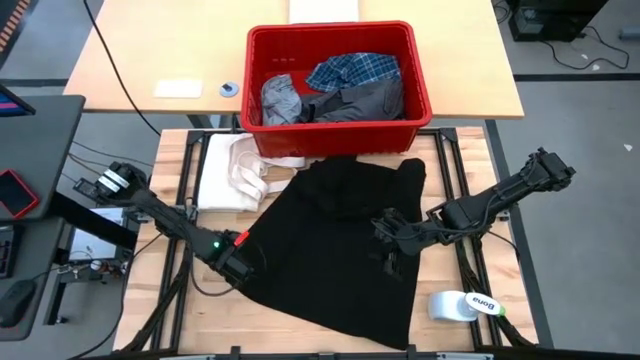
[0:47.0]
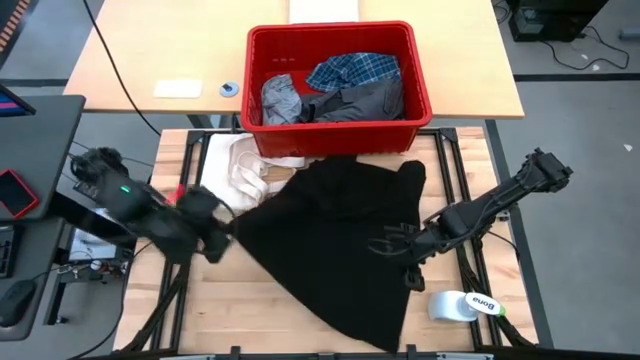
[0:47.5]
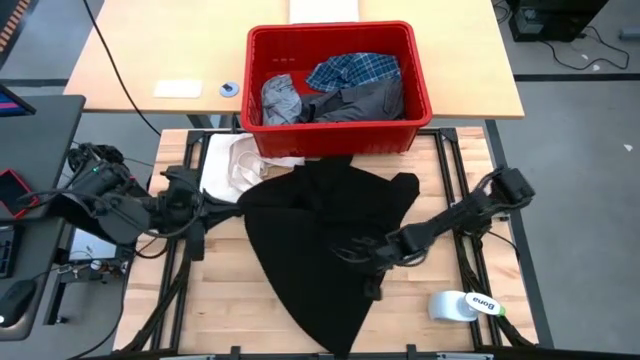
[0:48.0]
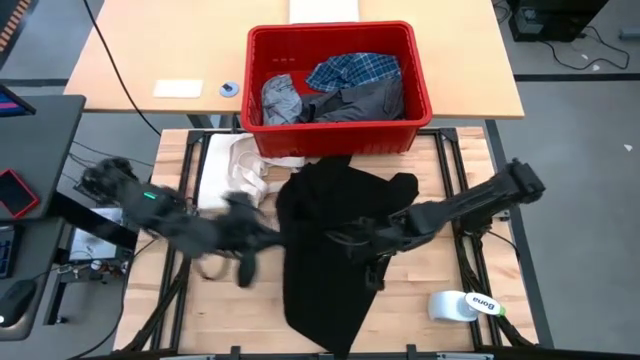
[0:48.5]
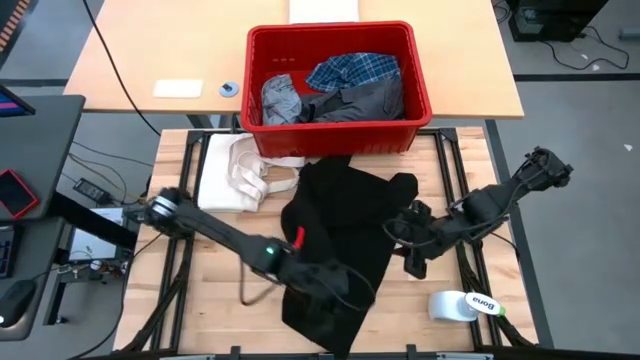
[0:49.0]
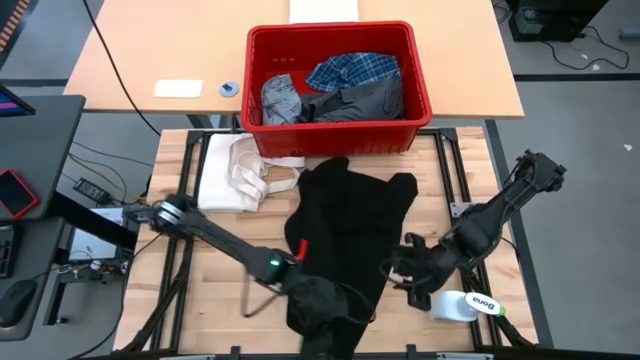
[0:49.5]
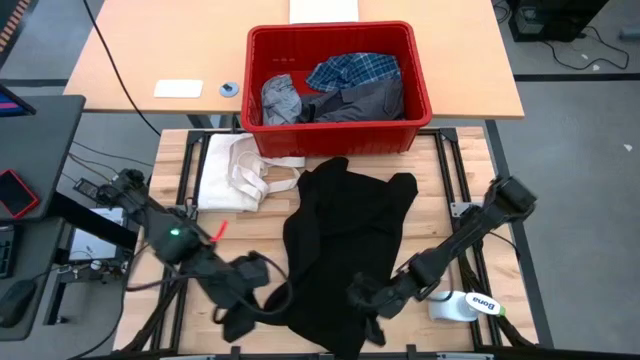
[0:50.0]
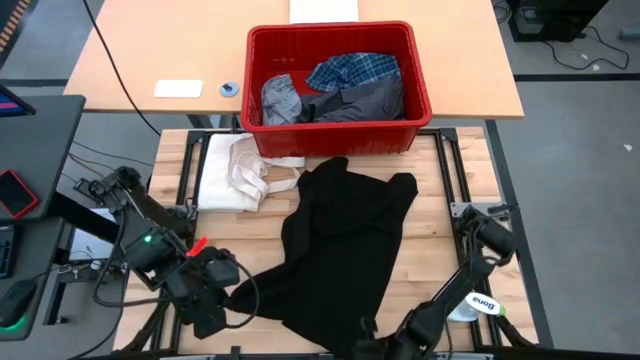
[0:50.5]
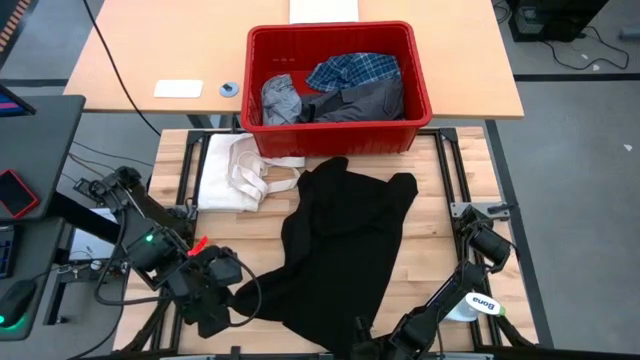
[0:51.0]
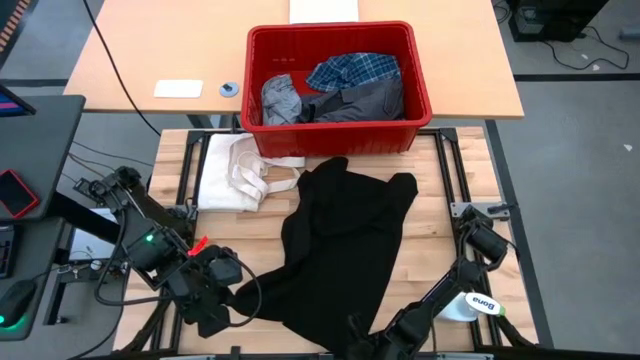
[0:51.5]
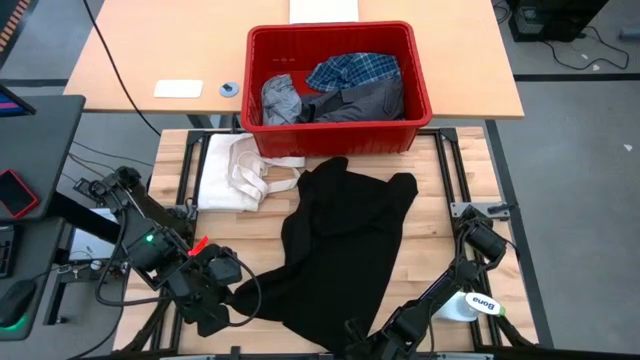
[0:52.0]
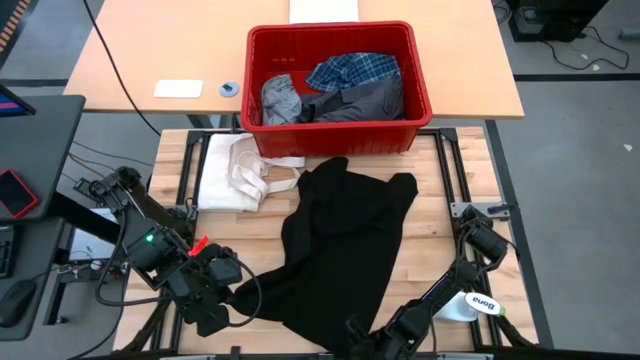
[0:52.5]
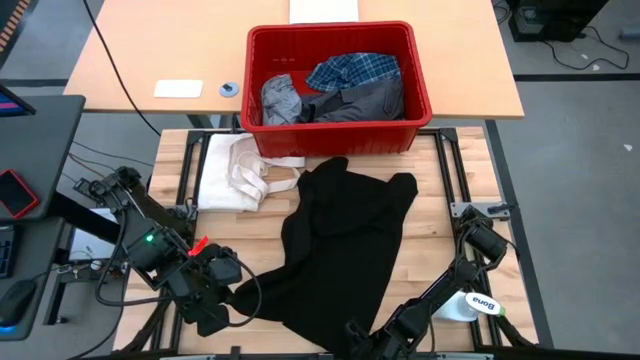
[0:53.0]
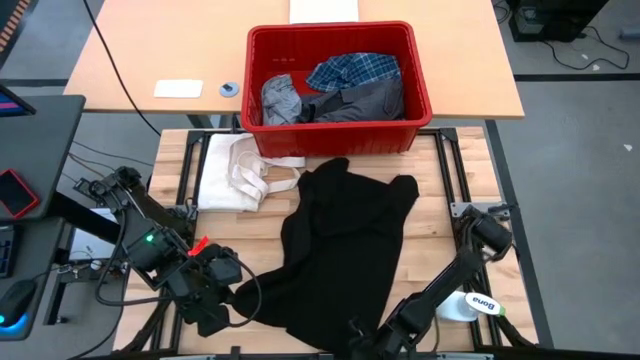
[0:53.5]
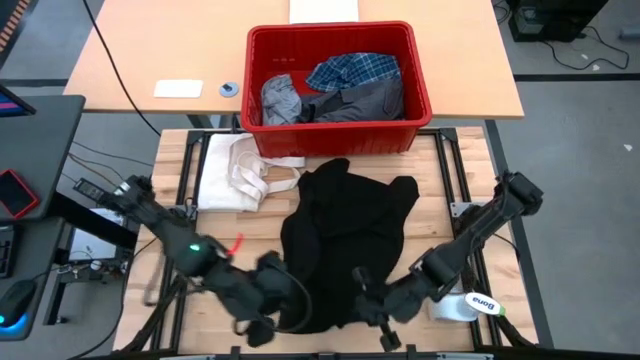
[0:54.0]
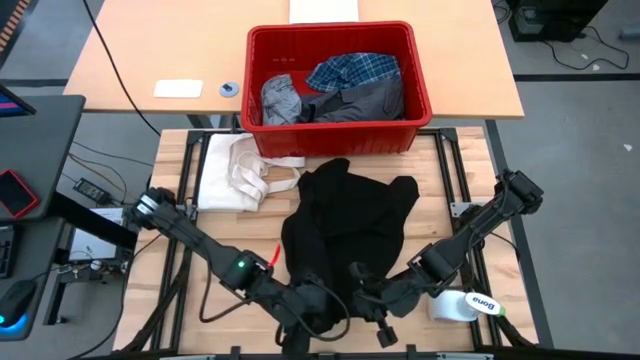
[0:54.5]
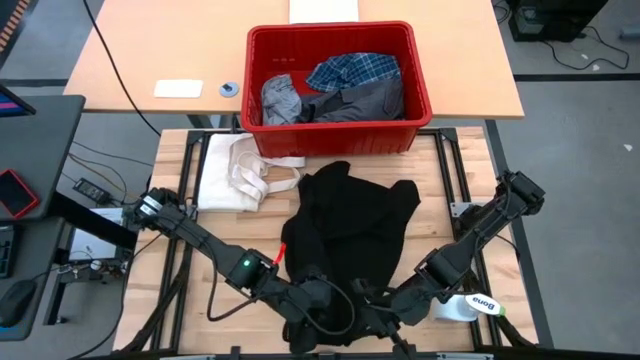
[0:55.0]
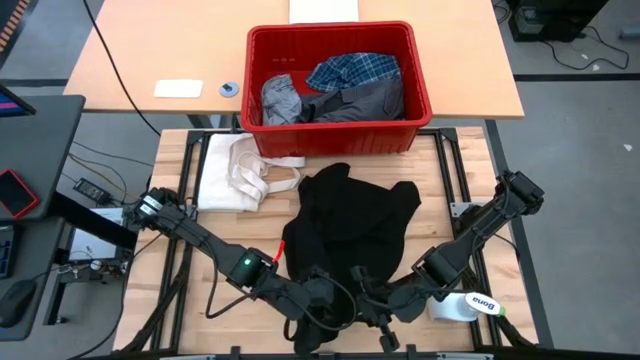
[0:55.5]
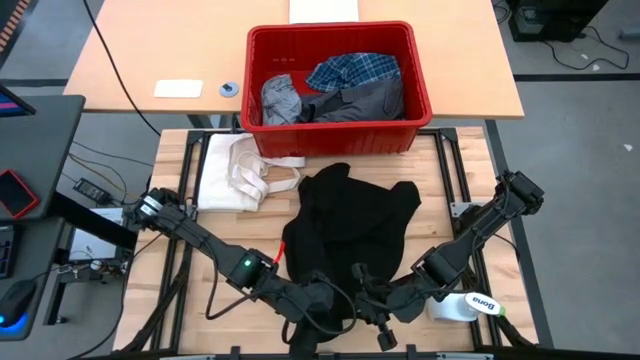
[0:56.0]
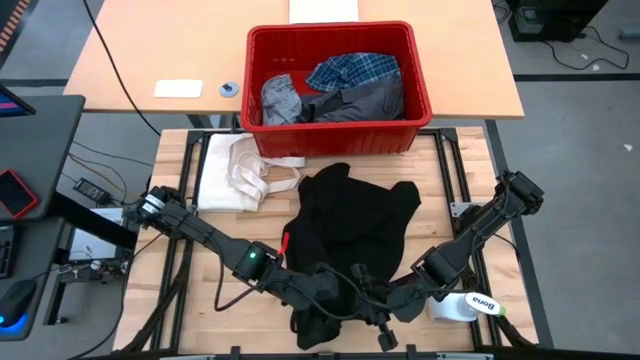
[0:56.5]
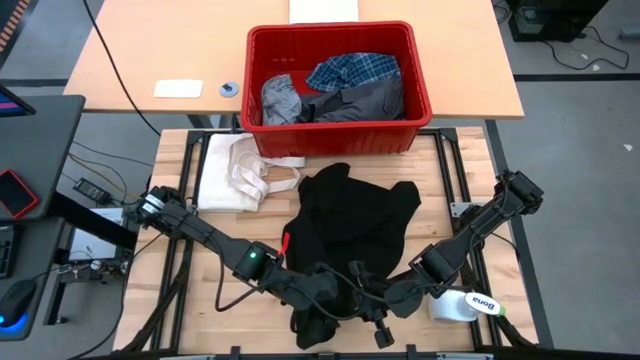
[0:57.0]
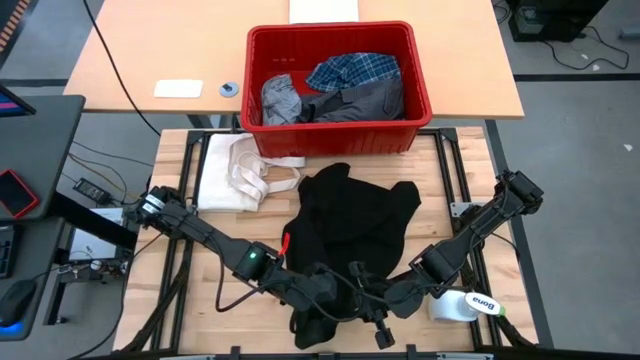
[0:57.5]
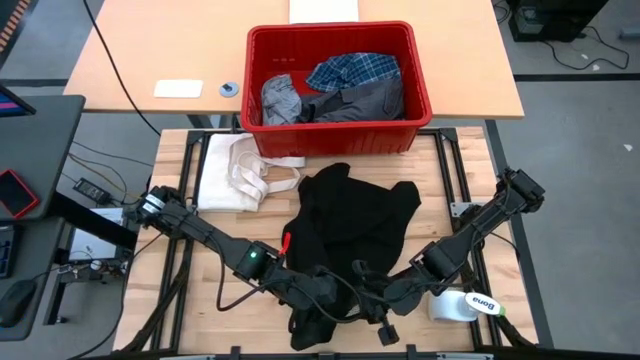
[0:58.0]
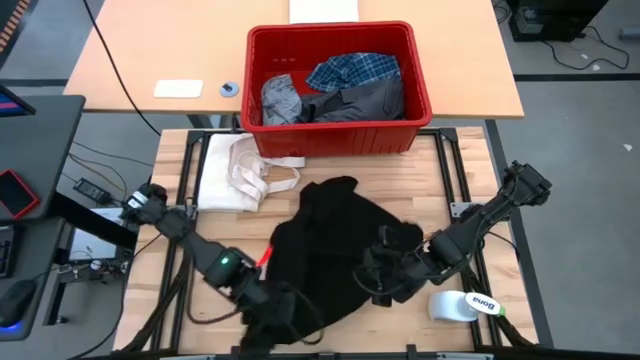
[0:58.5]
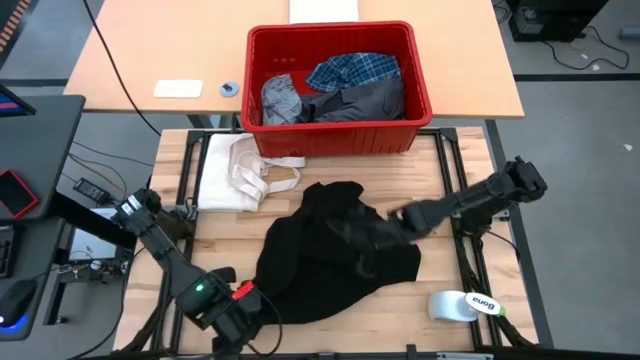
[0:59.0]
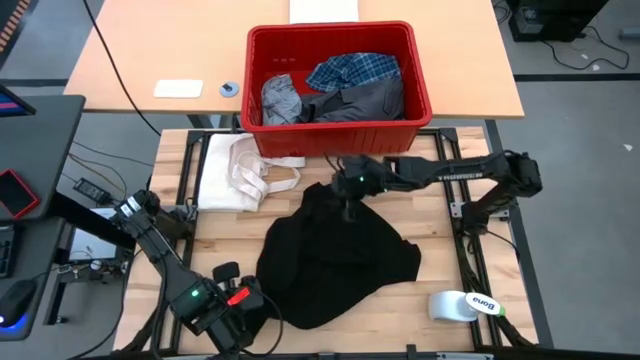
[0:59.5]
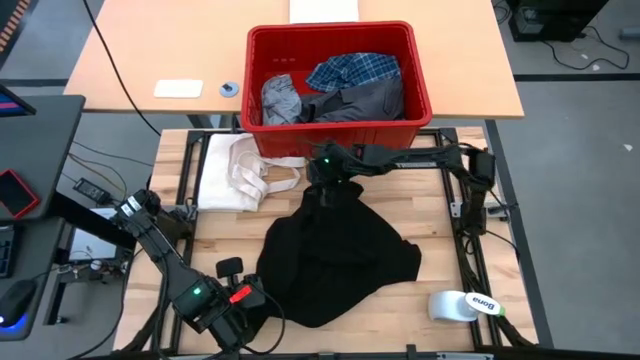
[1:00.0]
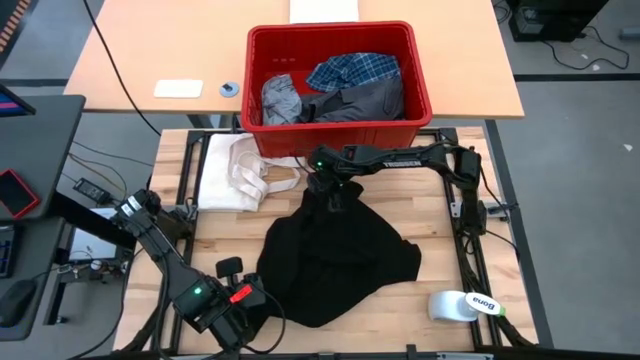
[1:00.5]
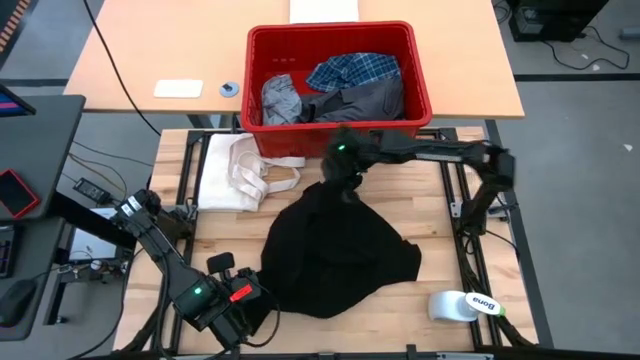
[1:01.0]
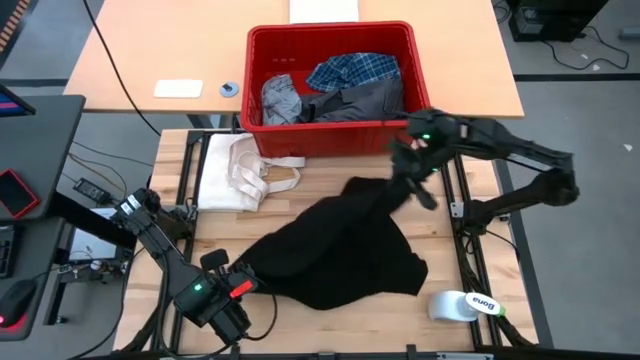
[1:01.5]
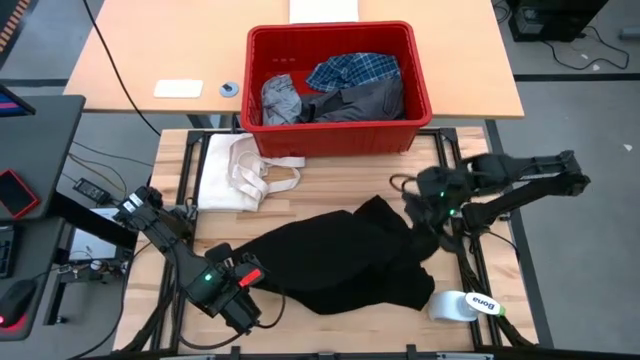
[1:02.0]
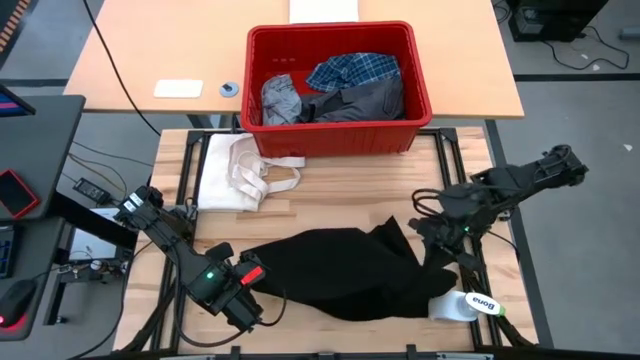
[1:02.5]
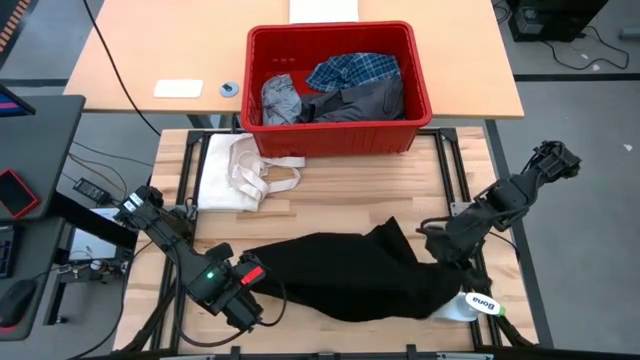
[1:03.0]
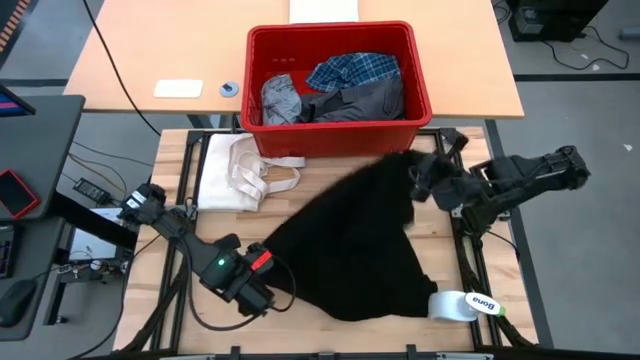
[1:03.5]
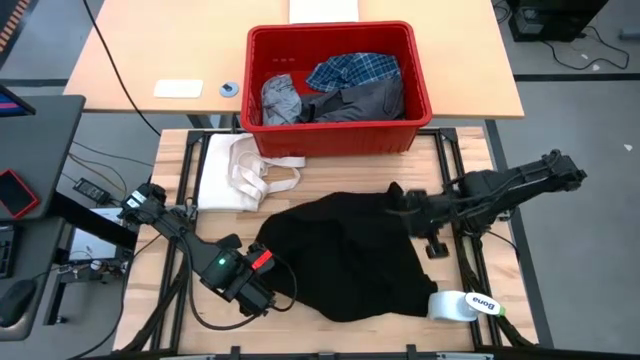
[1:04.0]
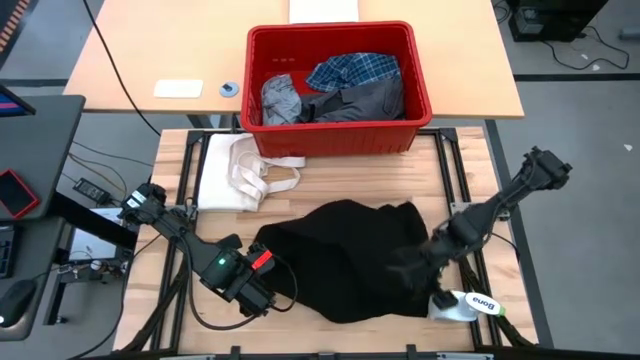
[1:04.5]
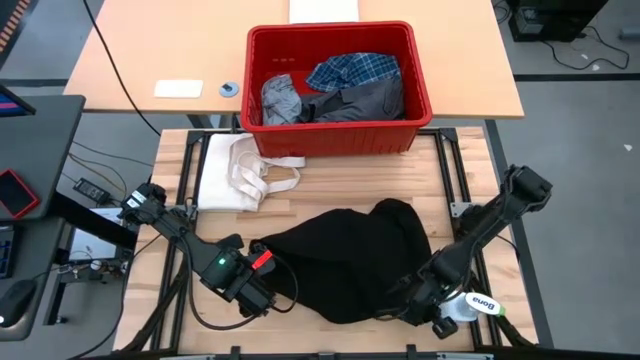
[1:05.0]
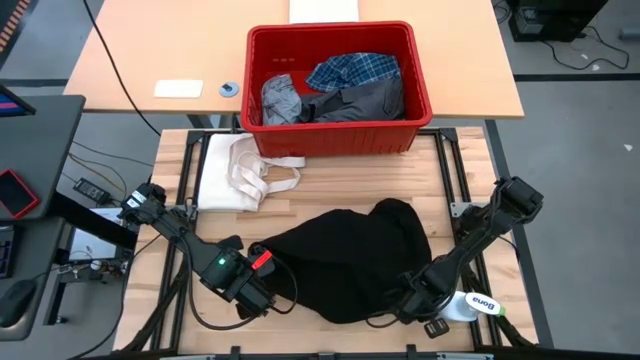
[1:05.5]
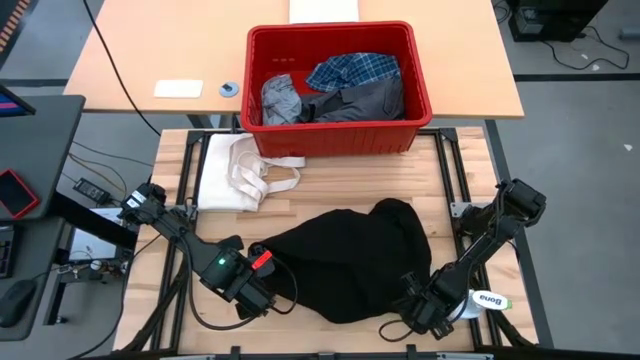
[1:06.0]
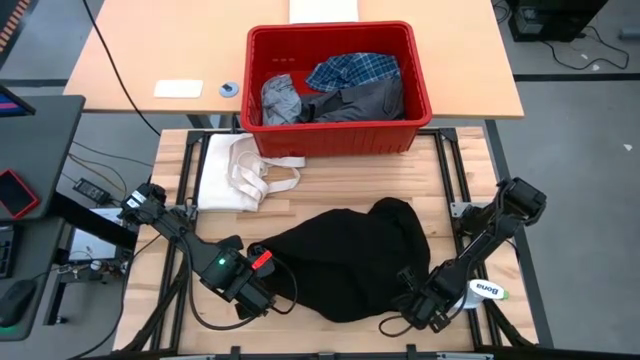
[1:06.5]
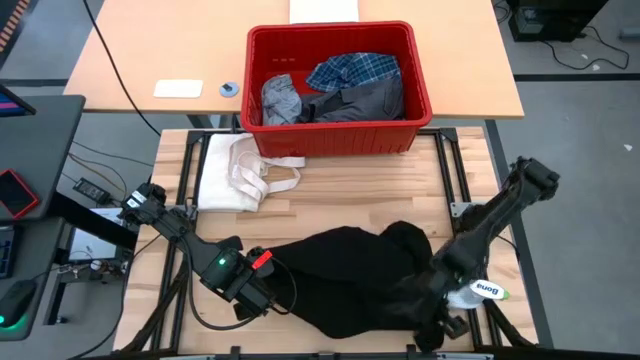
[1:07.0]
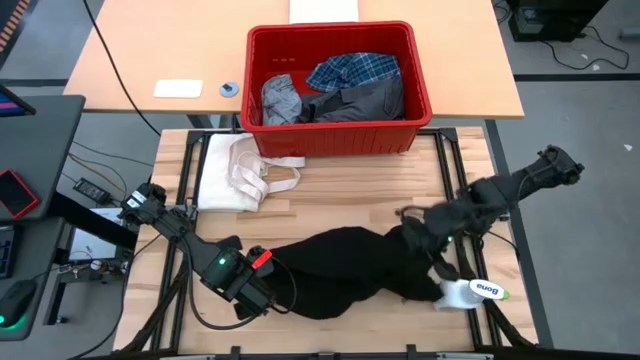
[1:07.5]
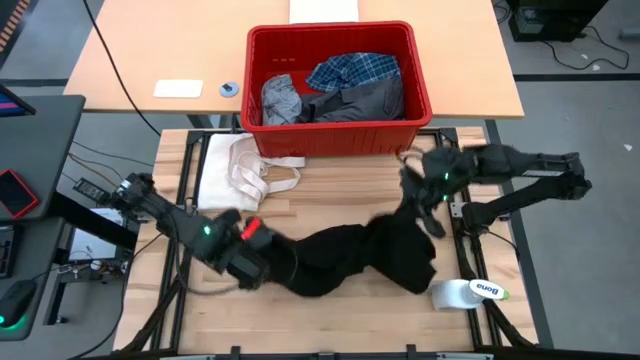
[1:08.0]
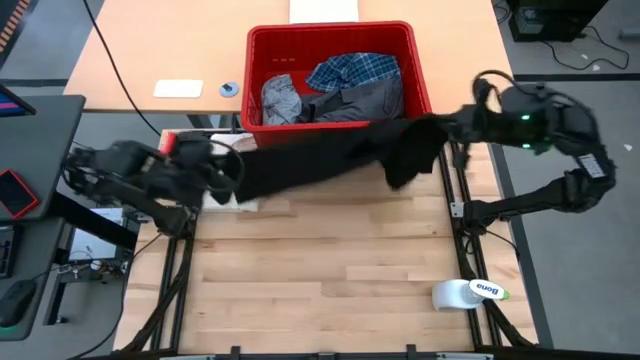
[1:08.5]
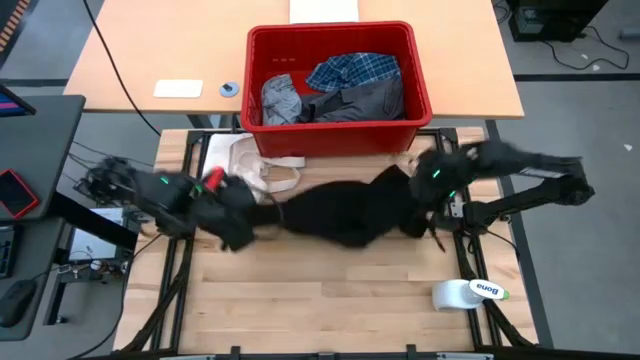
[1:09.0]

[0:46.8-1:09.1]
Task: Fold Laundry from Bin
Fold the black shirt
